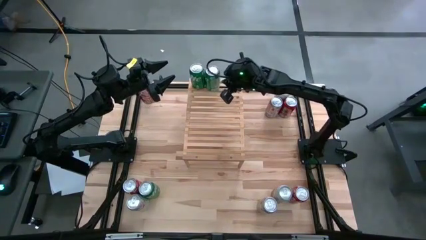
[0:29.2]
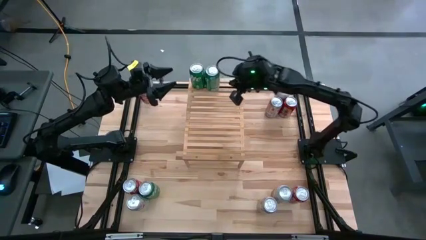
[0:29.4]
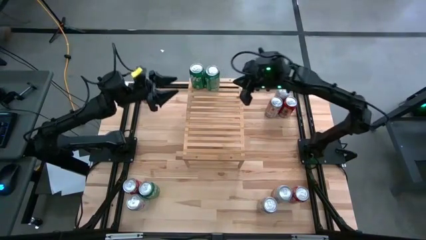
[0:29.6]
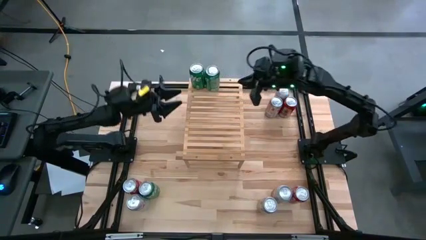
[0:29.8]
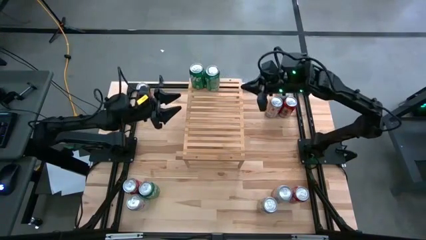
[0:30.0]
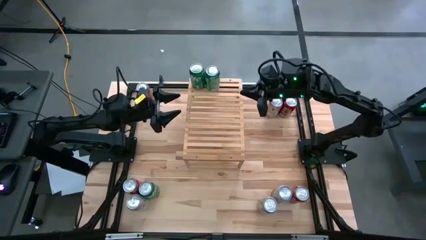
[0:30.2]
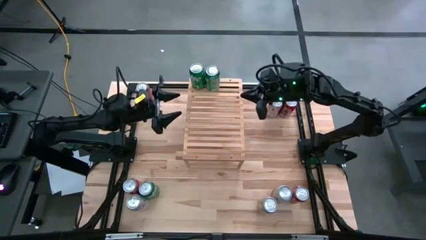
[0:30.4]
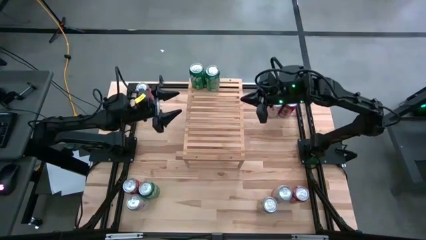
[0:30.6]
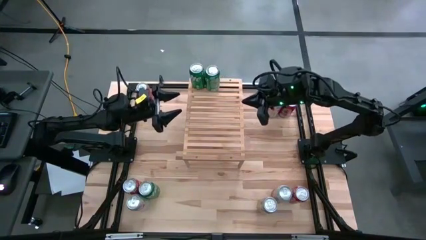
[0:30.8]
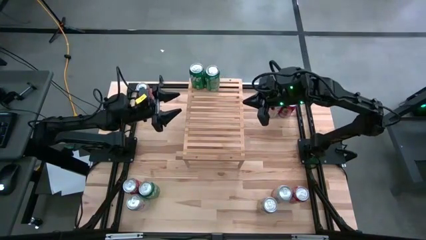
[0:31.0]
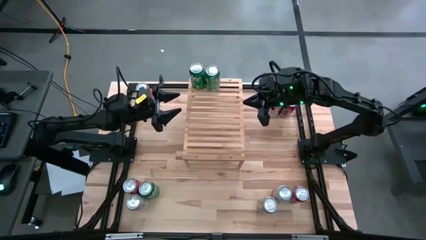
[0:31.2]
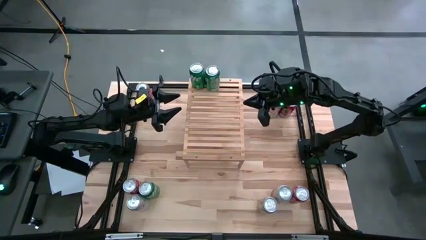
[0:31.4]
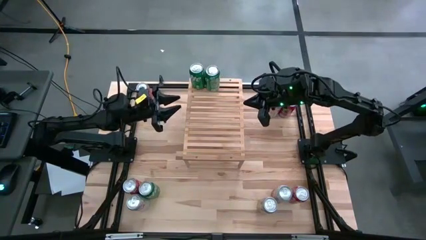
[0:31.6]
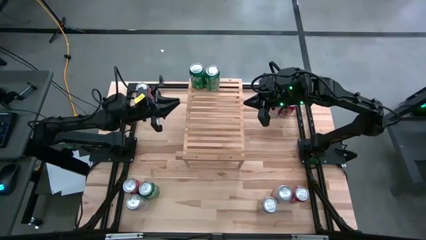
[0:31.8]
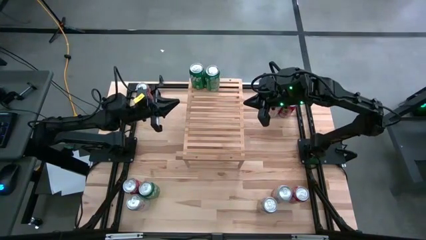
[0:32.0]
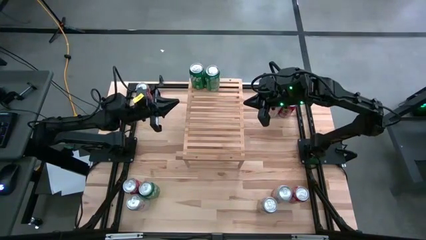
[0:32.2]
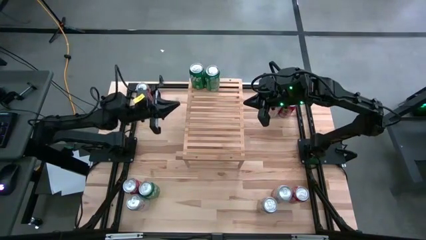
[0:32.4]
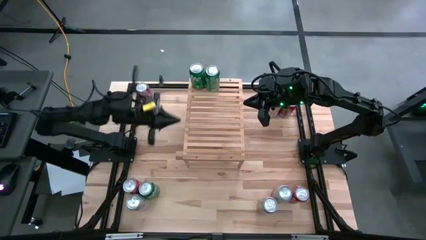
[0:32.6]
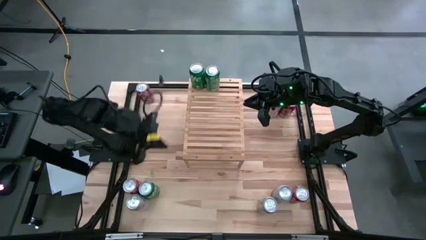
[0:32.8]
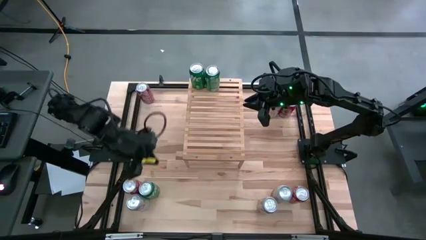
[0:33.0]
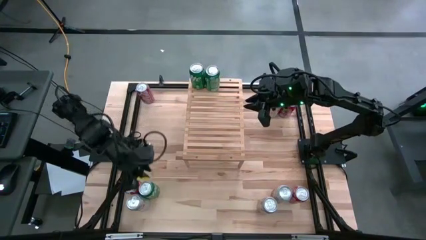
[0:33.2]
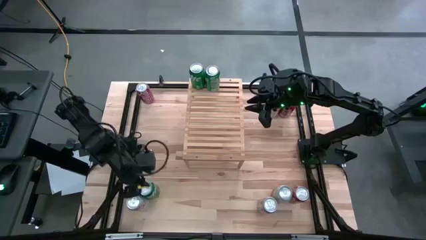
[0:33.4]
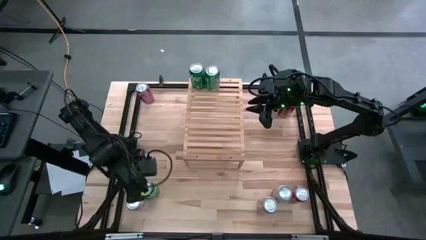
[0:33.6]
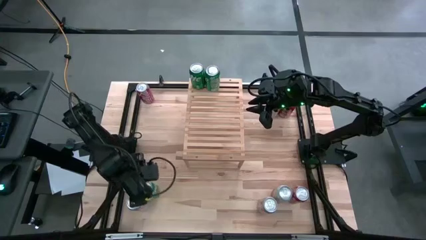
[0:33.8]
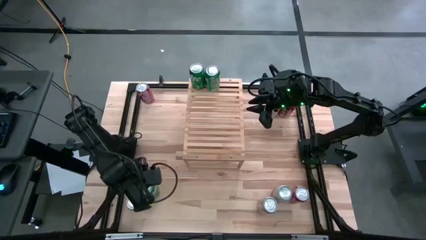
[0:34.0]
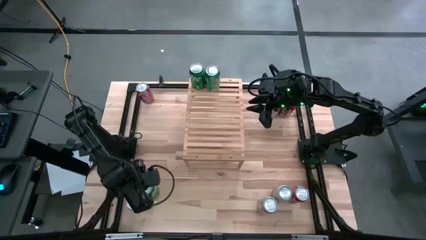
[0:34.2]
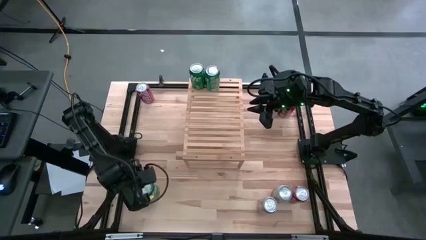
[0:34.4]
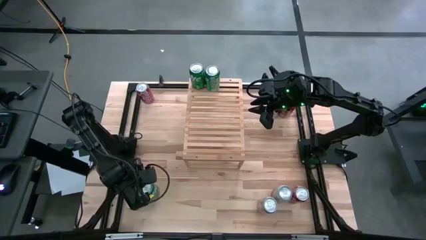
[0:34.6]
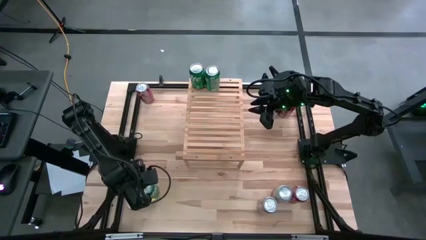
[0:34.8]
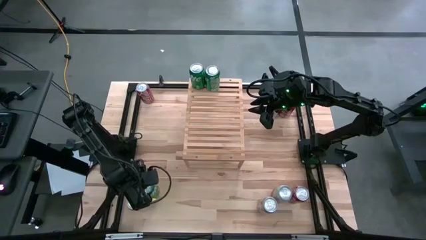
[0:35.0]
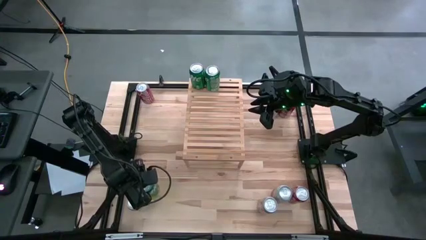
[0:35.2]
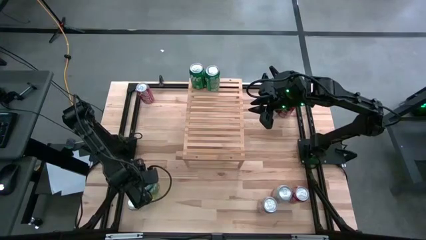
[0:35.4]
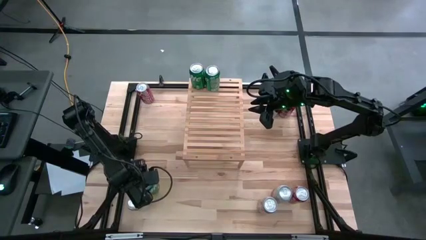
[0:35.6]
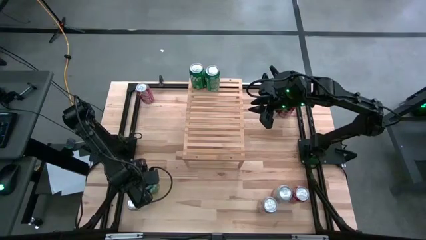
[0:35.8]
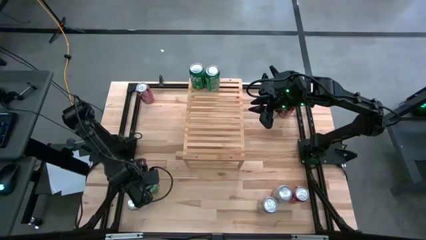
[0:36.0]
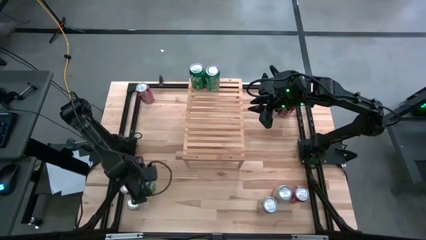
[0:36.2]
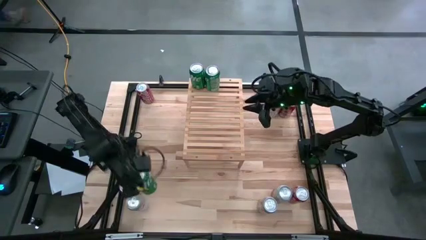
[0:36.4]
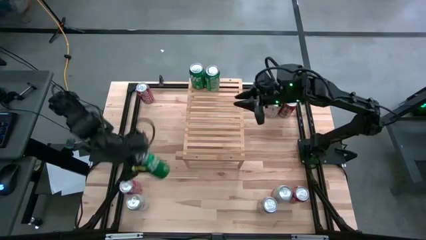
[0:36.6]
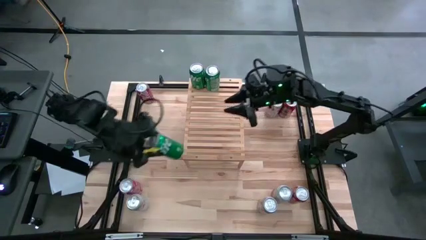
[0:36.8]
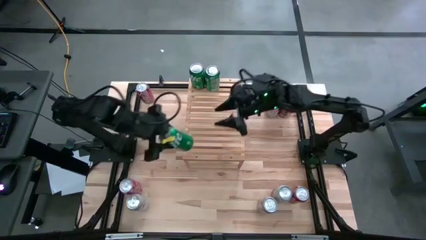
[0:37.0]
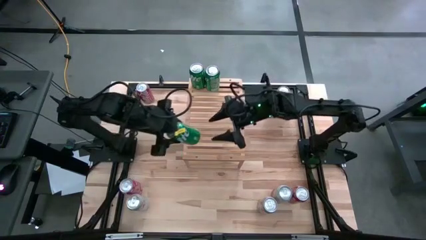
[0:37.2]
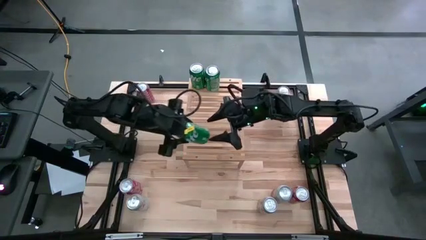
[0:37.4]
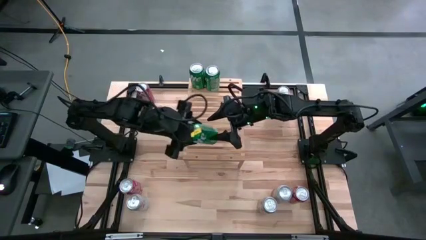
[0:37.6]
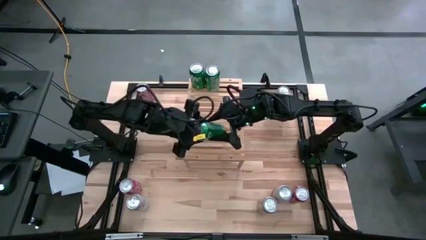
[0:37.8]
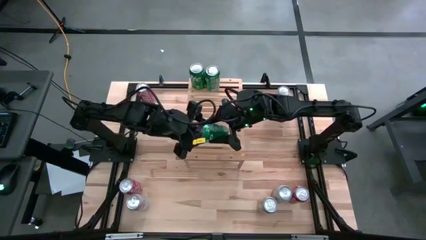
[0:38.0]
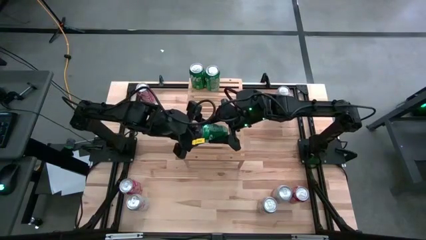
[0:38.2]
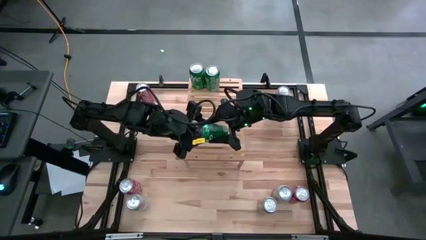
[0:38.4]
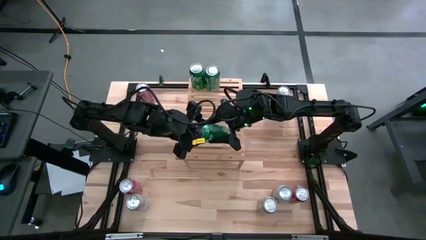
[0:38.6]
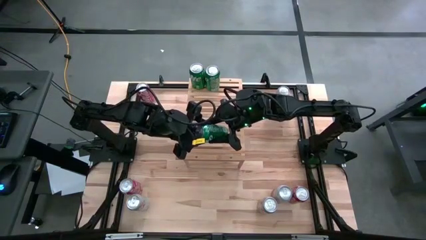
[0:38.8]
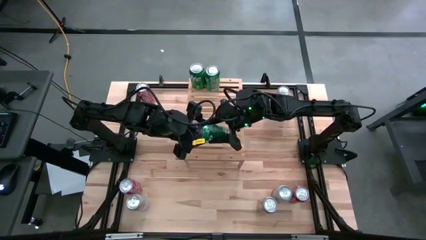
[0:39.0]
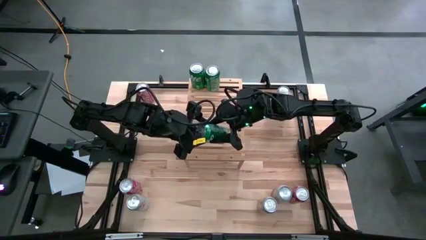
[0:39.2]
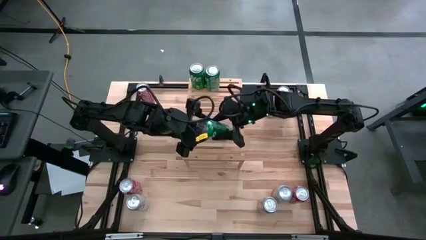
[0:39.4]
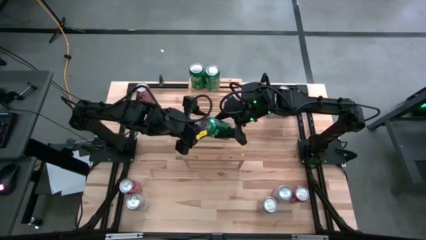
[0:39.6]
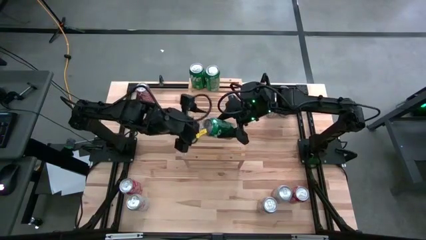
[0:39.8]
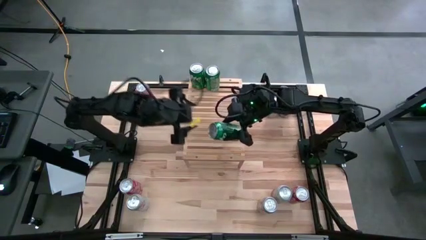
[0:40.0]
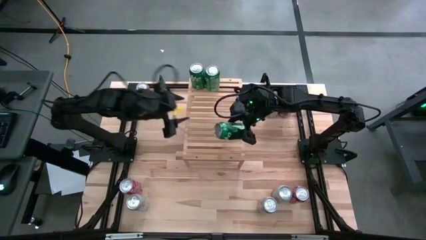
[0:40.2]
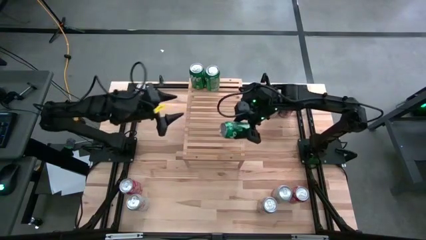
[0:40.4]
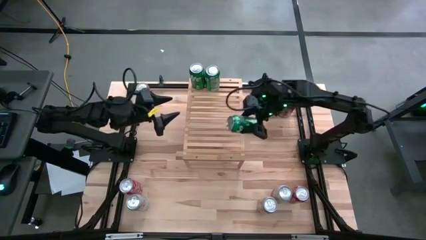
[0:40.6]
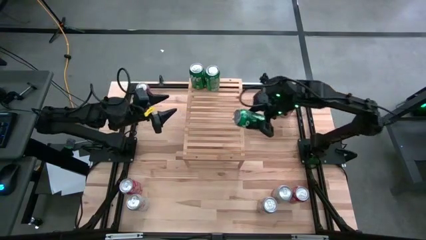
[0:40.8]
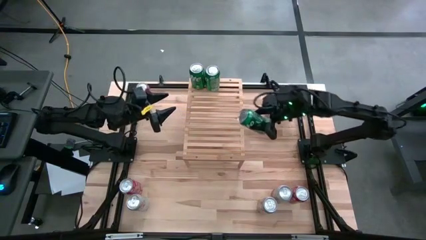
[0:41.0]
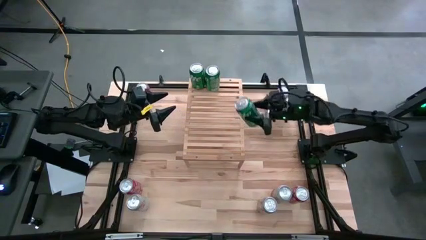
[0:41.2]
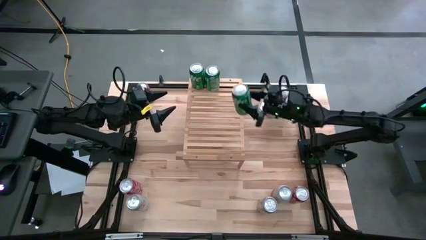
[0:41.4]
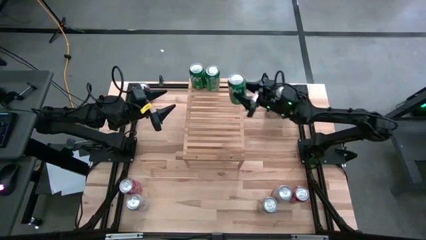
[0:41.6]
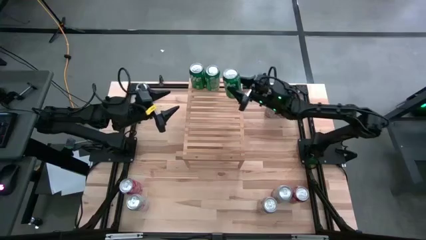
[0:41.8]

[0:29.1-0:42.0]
Task: Place canned beverage on shelf
Put the green soda can on the shelf aligned with the other green soda cans

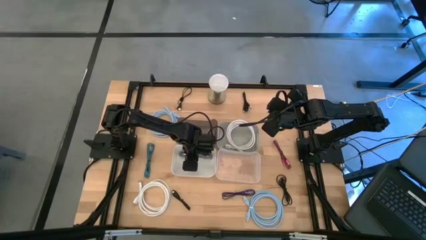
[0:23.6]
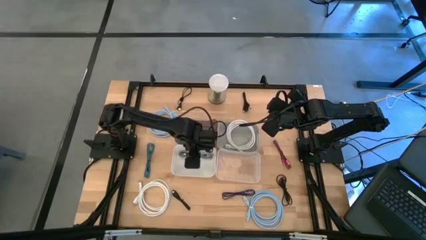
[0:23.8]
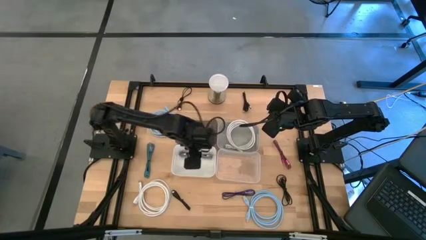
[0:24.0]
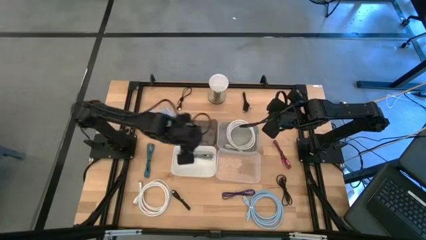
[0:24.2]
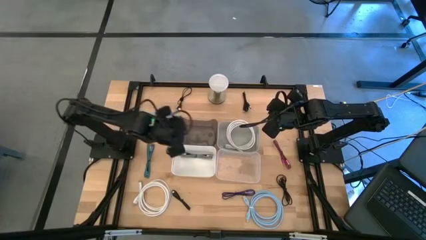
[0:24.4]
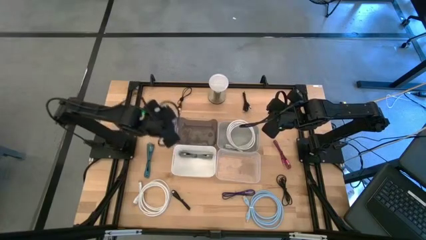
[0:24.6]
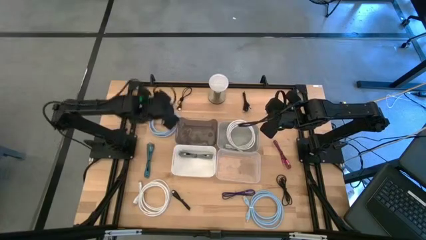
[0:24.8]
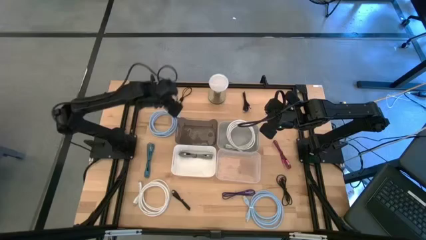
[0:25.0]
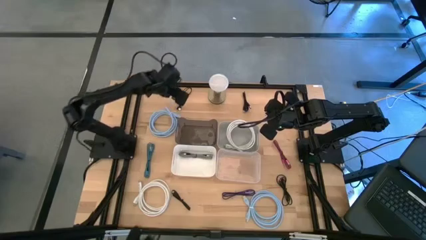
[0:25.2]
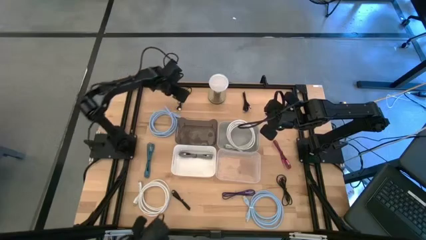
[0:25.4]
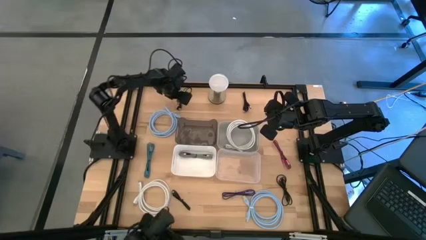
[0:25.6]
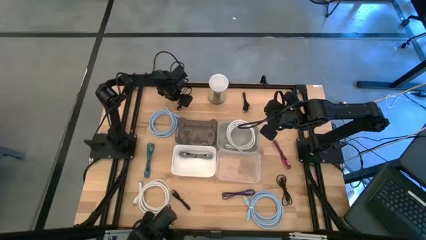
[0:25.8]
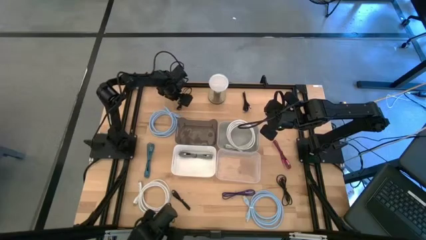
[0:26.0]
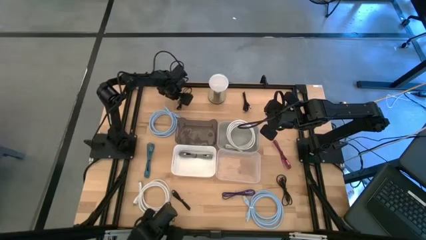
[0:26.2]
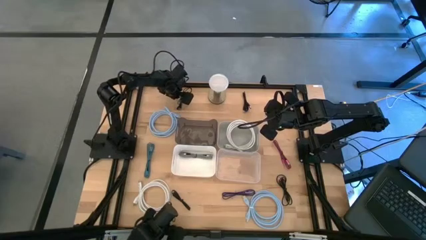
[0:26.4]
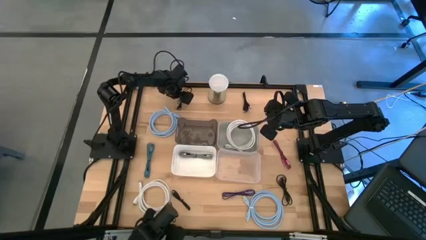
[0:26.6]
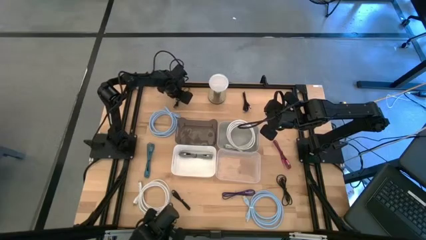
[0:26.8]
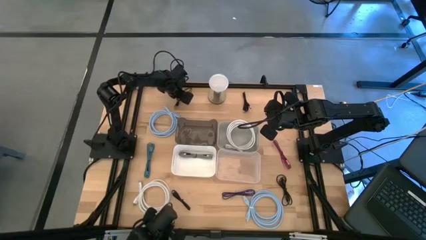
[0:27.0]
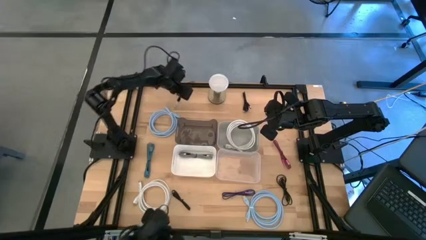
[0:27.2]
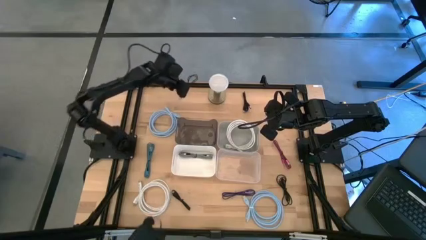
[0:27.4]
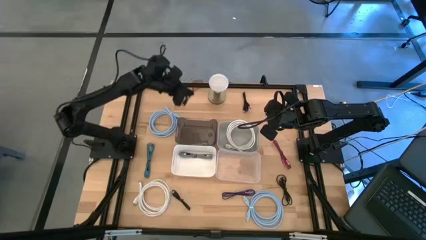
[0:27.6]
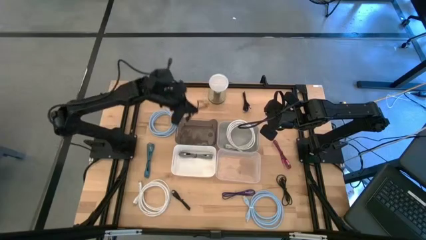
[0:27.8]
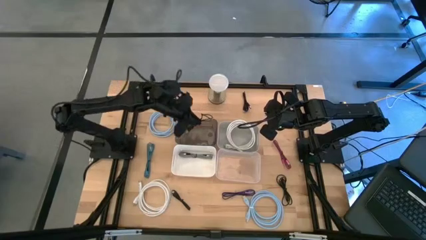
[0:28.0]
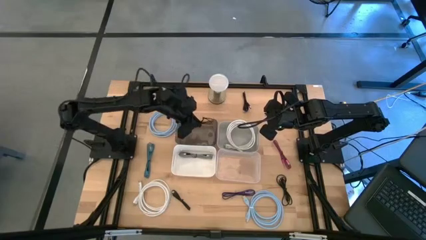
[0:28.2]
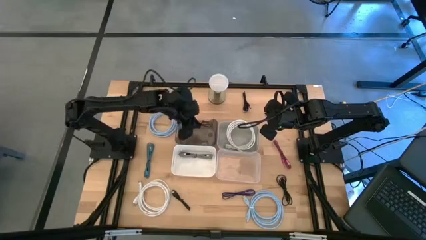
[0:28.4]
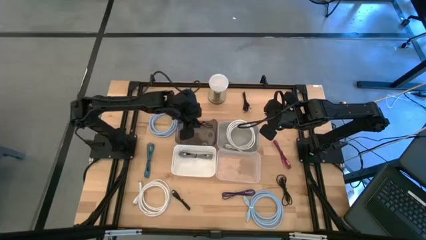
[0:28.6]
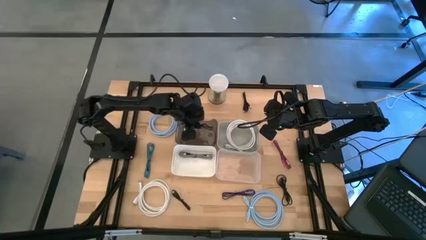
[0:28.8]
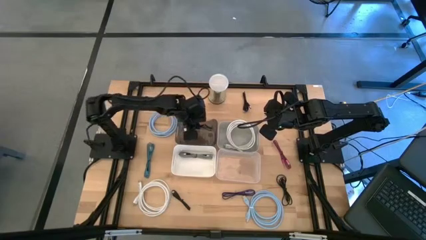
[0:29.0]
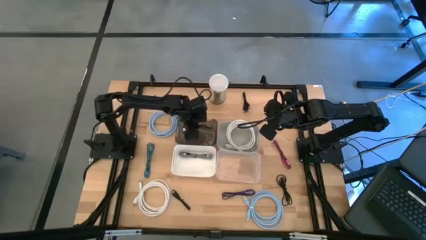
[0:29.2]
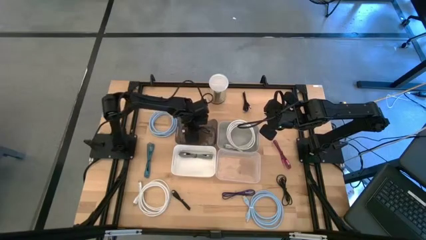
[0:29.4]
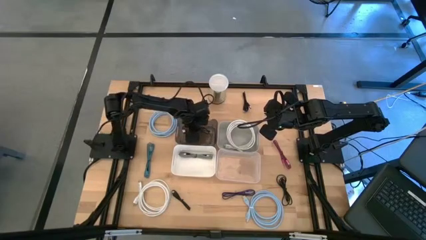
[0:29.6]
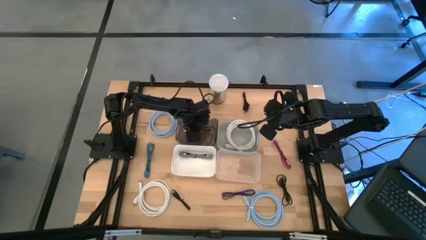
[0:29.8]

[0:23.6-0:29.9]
Task: Pick & Place USB Port
Put the top left black charger cable into the black bin
